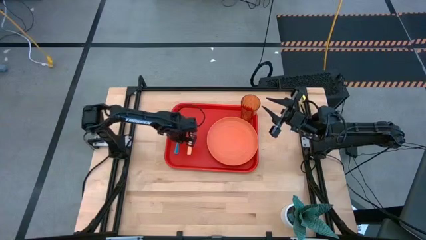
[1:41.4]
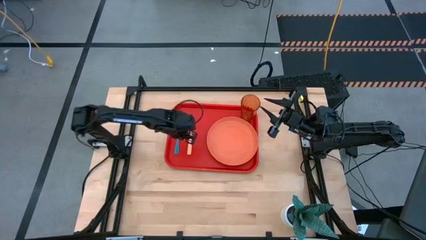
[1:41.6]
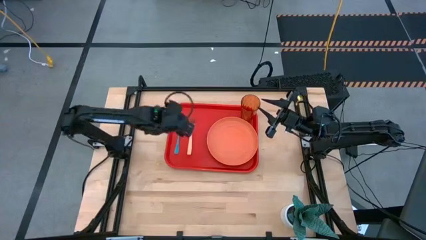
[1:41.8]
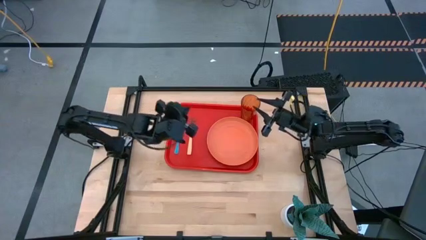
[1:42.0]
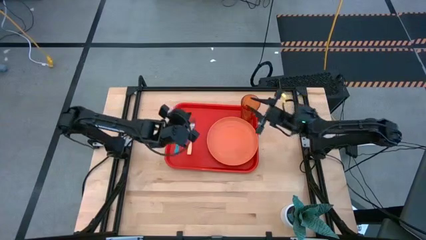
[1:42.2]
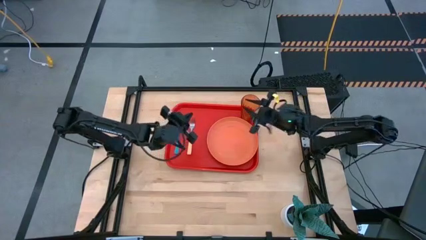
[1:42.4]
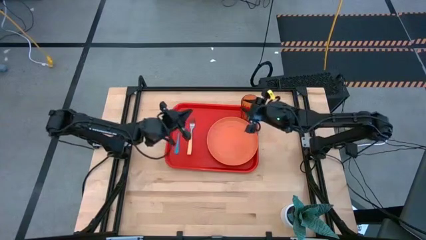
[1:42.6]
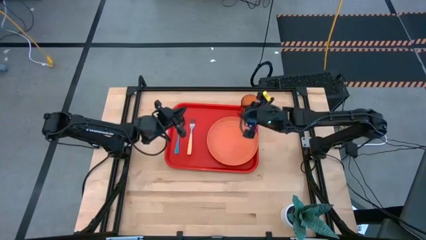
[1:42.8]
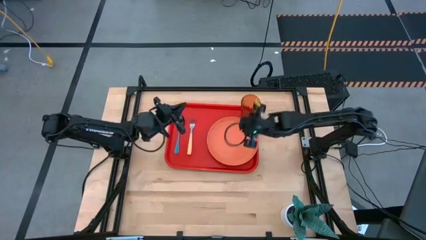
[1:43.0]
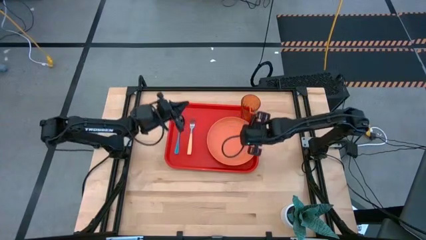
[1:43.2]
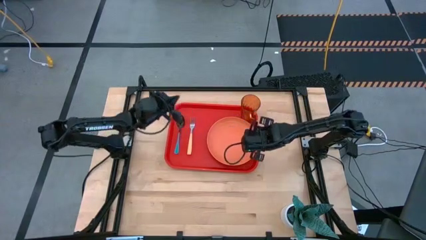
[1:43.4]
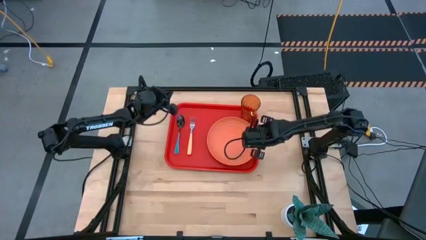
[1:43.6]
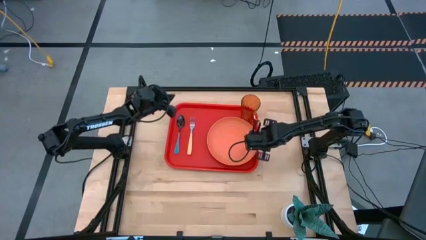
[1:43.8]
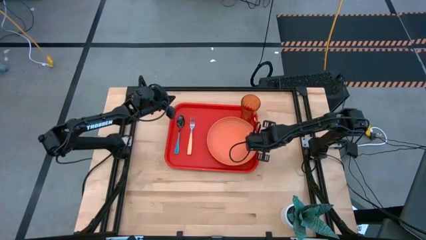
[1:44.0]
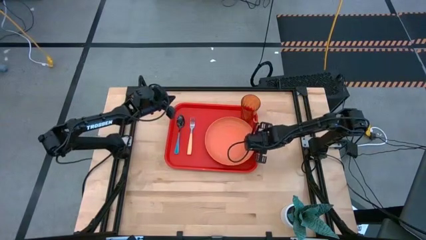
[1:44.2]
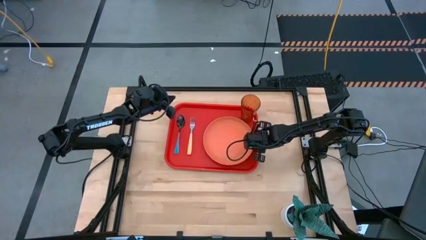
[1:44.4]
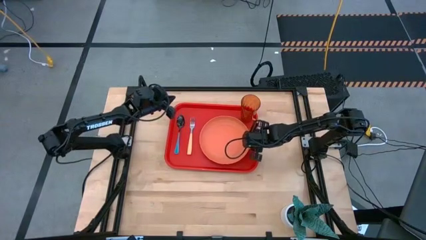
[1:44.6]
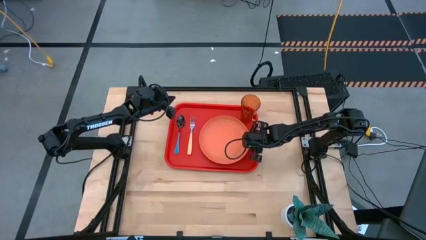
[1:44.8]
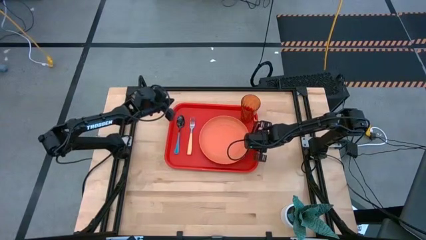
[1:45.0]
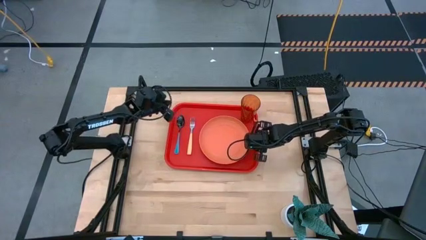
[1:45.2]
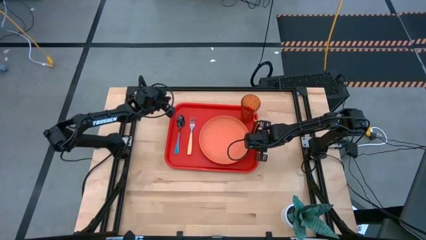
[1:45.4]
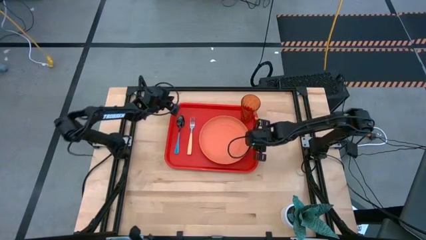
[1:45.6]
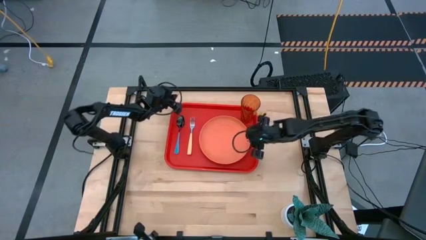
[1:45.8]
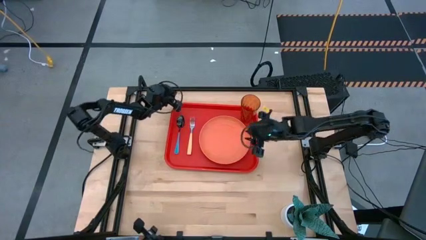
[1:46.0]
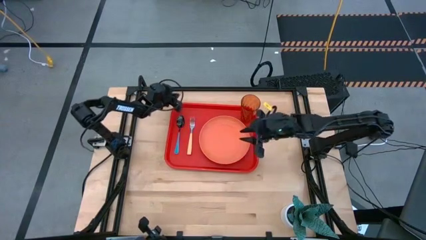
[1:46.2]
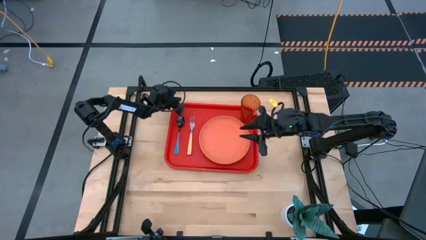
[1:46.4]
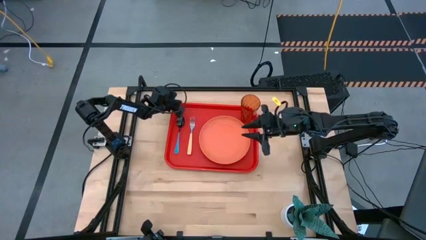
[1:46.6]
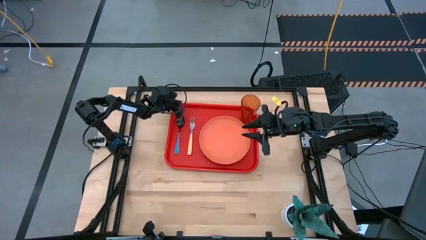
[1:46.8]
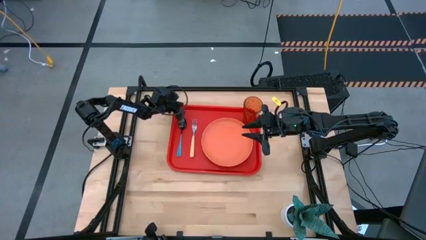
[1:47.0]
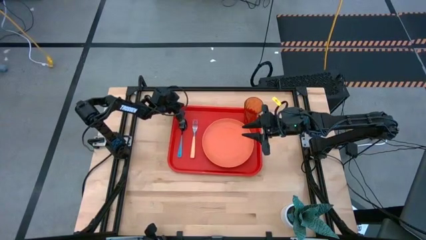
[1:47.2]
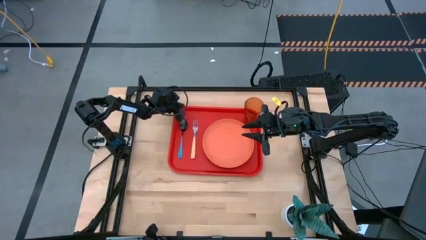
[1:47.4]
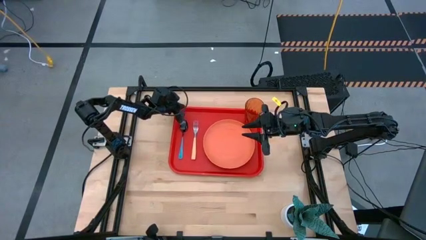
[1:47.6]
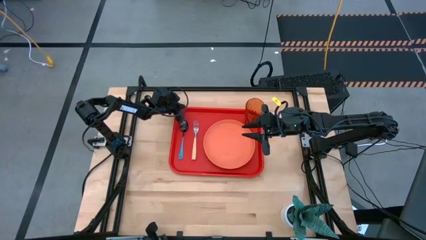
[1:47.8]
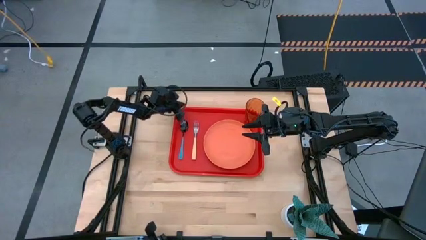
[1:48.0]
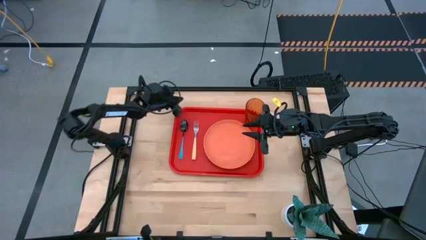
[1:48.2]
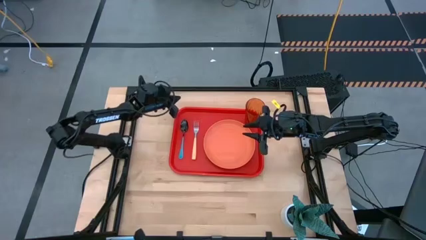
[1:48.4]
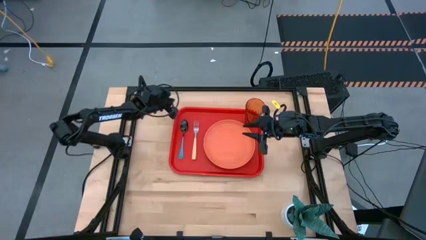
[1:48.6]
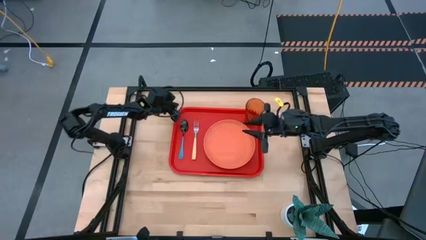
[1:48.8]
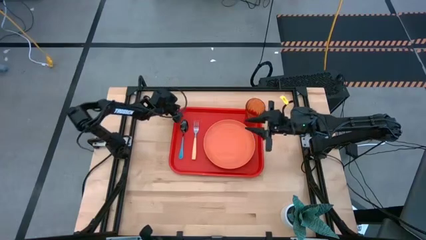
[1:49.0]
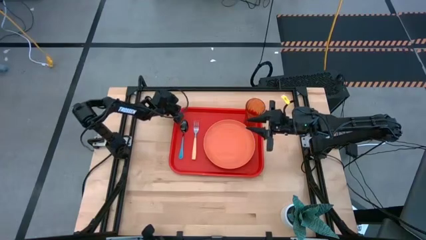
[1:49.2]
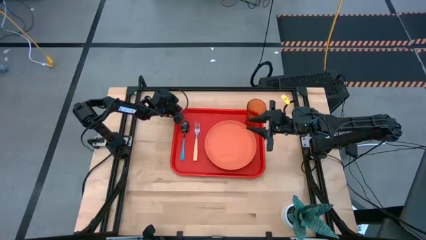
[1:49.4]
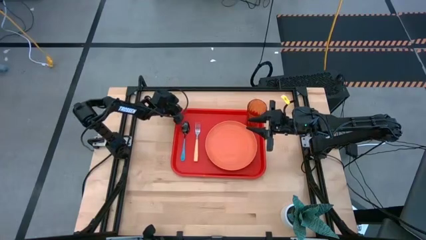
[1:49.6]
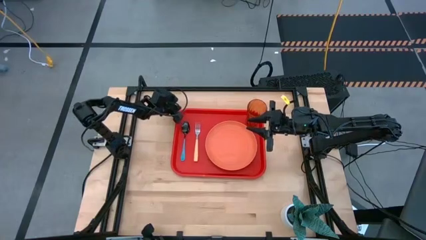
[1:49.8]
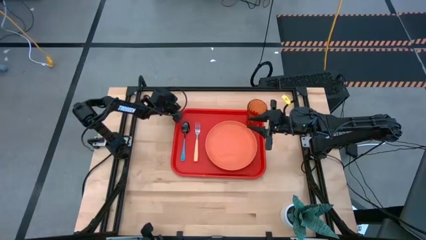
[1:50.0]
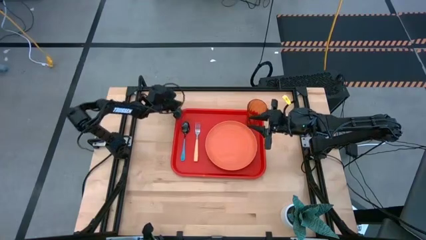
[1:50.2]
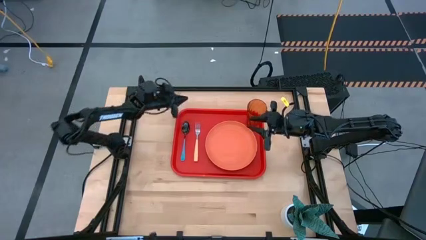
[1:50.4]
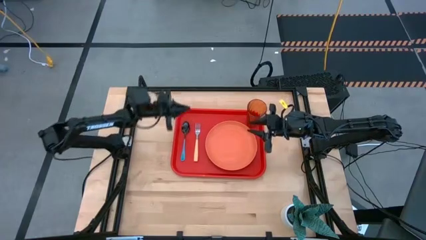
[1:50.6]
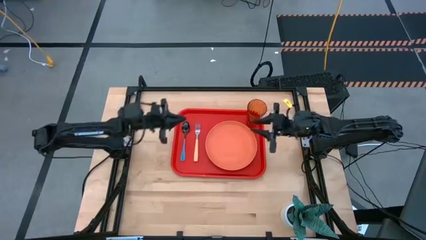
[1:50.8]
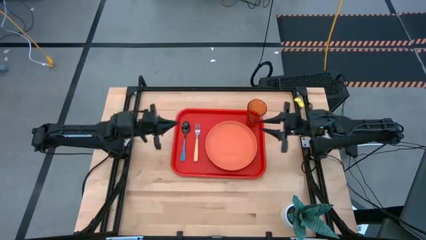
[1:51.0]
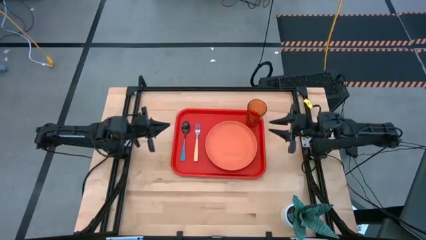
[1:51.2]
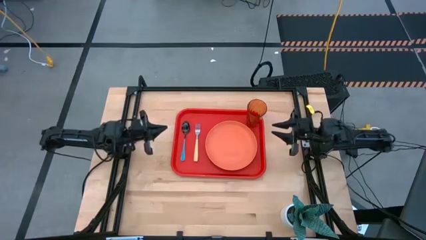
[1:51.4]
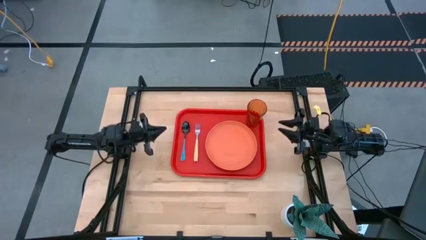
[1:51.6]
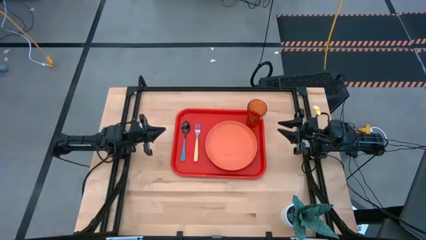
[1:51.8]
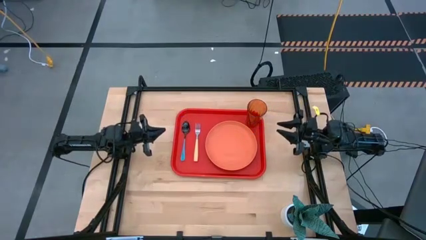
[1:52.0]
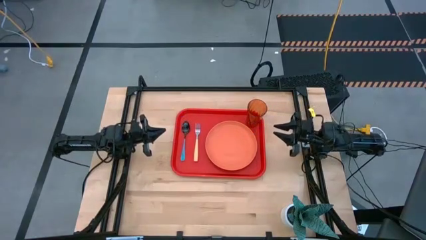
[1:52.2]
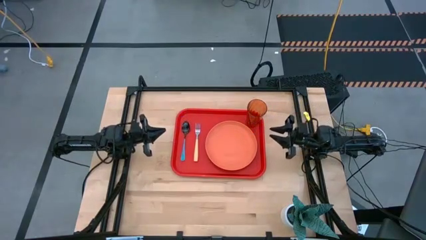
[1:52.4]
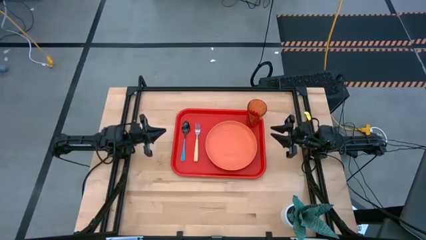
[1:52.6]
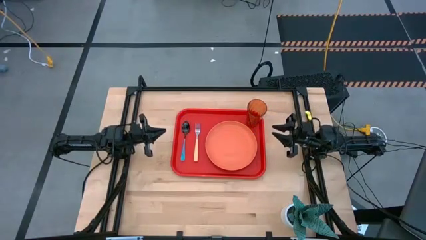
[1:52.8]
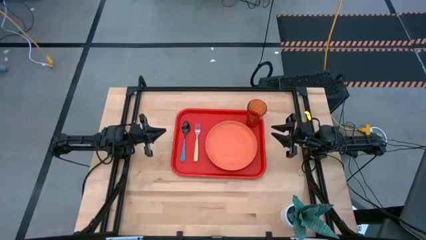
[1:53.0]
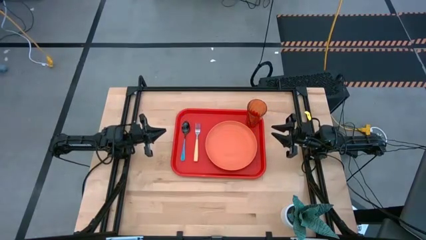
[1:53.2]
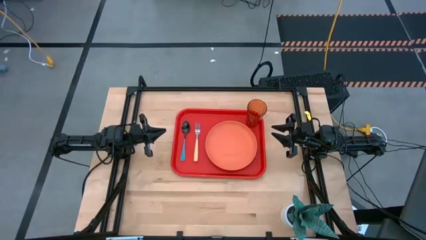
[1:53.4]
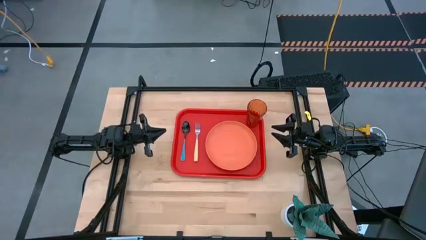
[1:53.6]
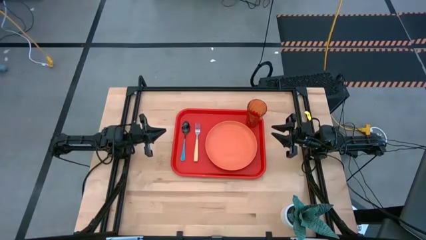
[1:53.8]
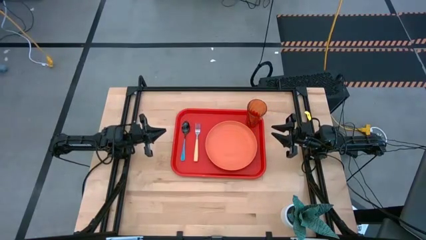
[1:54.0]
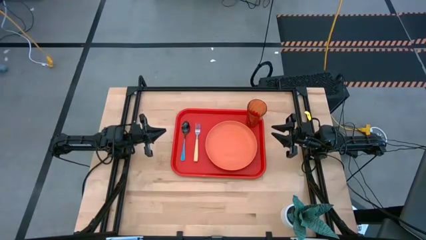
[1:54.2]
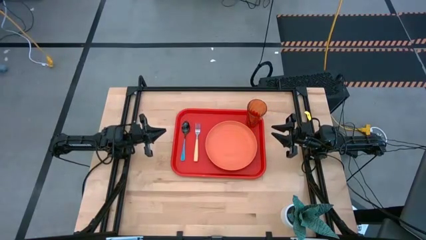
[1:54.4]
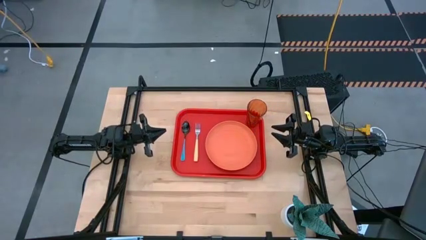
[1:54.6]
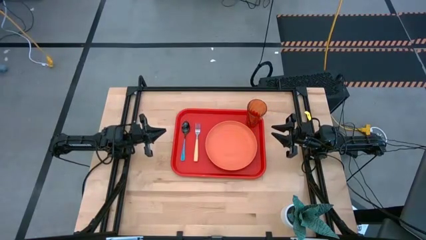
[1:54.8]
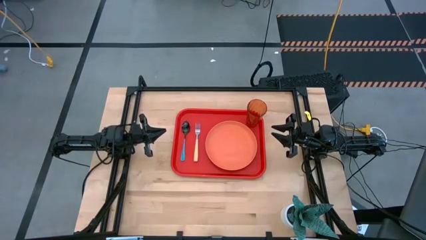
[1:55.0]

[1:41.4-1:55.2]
Task: Pick and place plate/cup/fork/spoon on tray
Adjust the blue spoon, orange plate, and the red tray

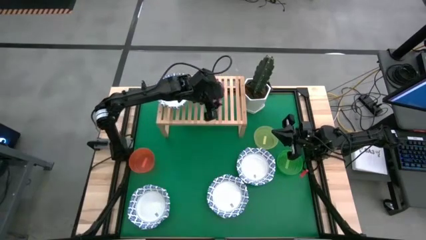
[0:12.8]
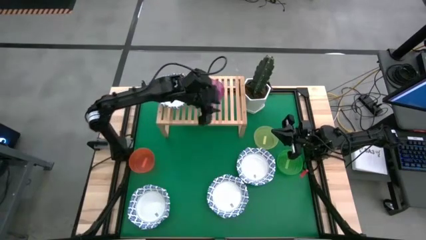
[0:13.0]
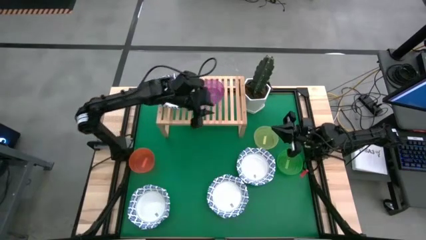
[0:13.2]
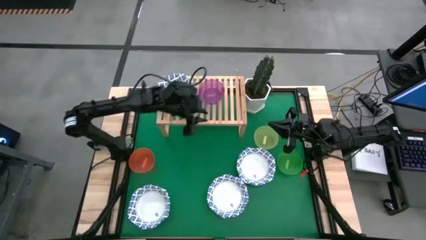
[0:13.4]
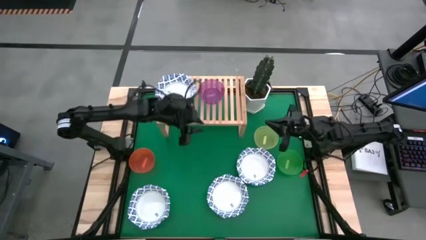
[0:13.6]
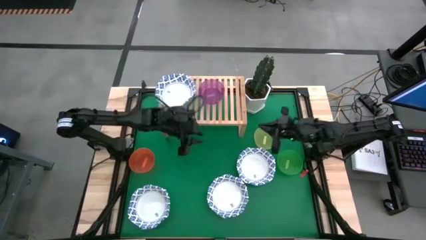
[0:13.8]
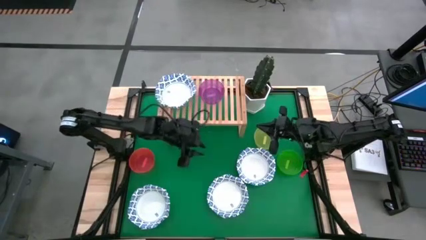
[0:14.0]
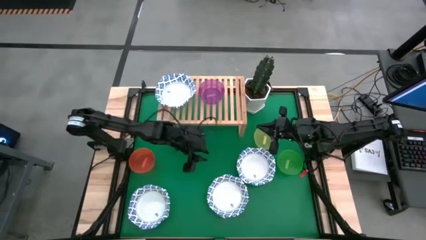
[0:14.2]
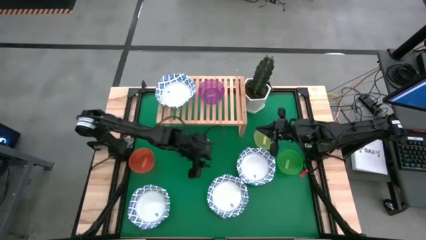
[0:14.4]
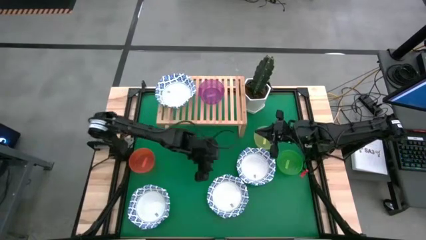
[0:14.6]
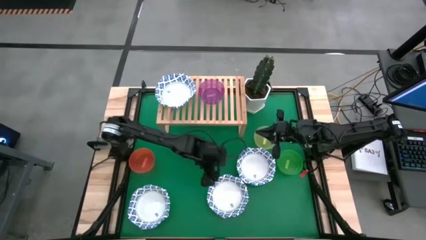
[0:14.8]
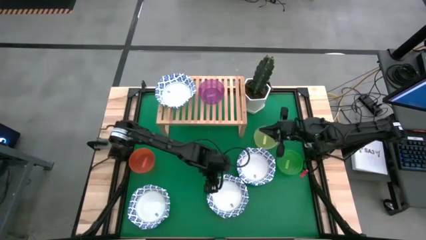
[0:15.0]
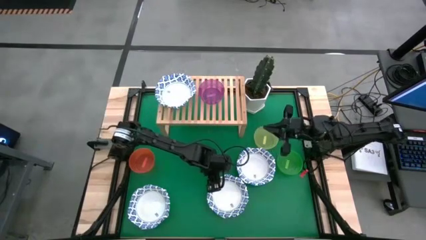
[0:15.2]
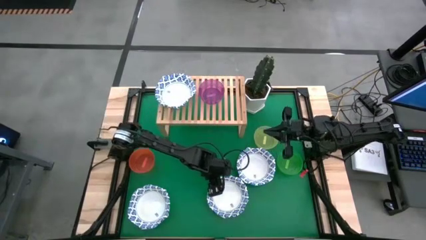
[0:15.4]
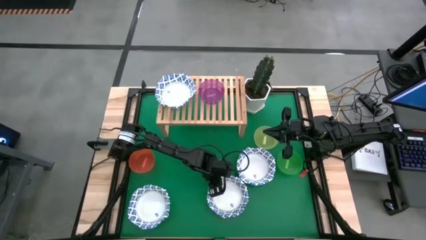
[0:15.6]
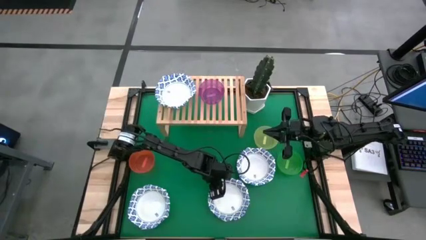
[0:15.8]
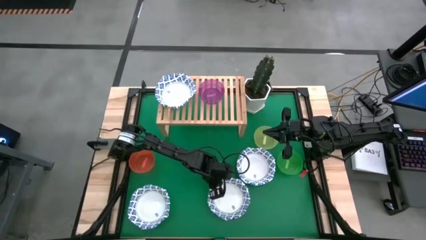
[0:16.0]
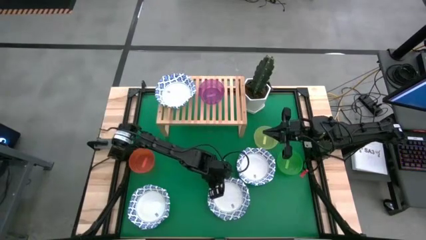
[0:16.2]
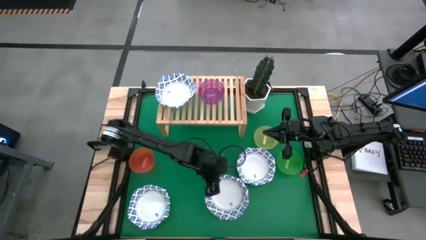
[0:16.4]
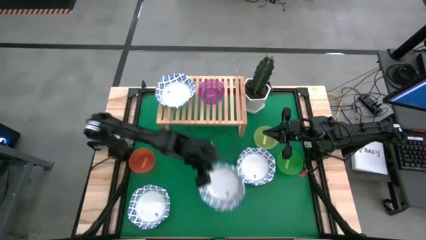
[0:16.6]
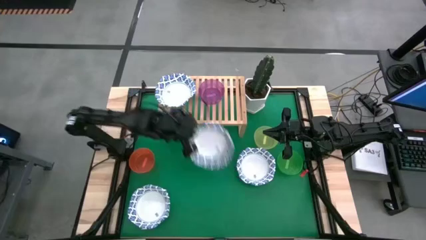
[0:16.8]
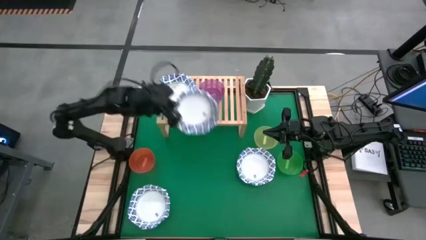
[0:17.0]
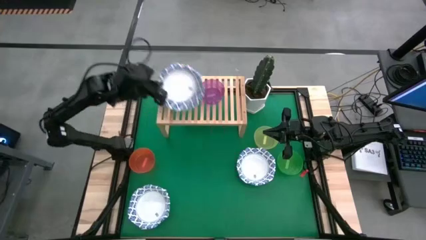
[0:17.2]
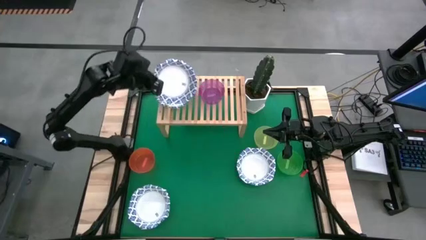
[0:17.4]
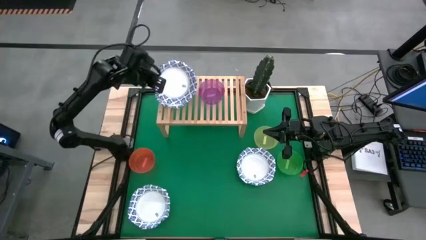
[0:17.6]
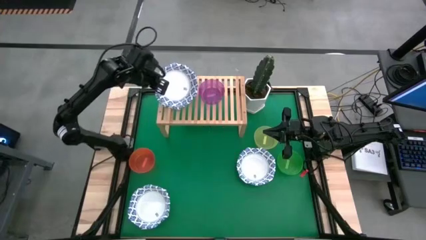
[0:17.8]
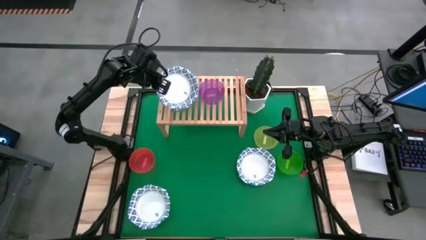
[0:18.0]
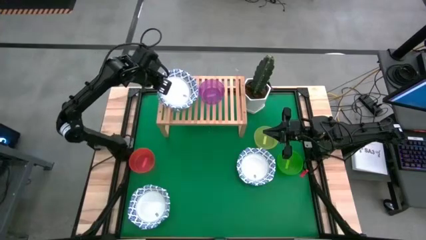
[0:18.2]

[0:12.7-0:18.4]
Task: Place and stack bowls onto a shelf
Stack the blue patterned bowl on top of the blue patterned bowl on the shelf
